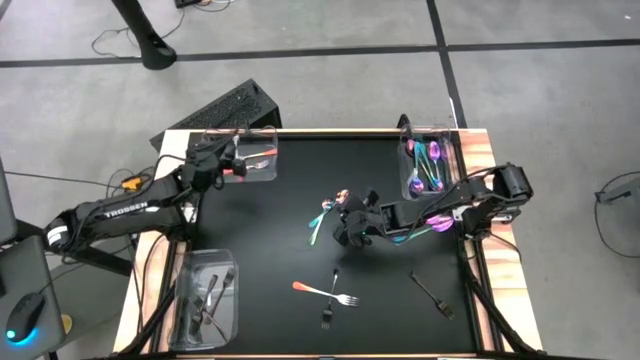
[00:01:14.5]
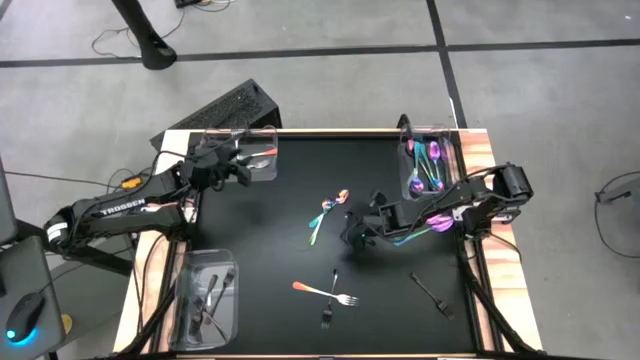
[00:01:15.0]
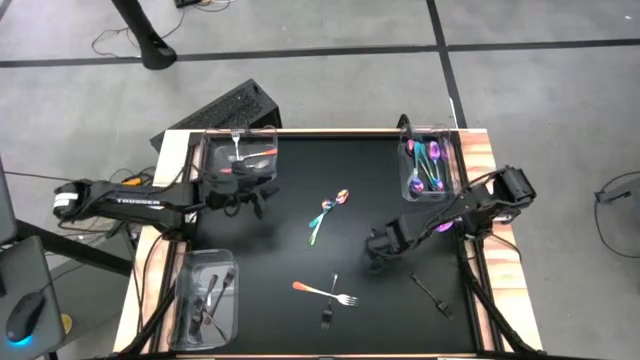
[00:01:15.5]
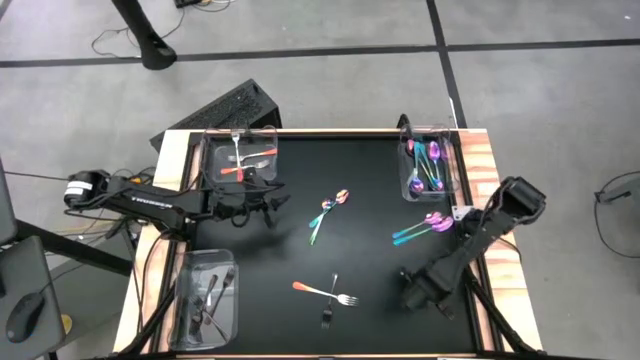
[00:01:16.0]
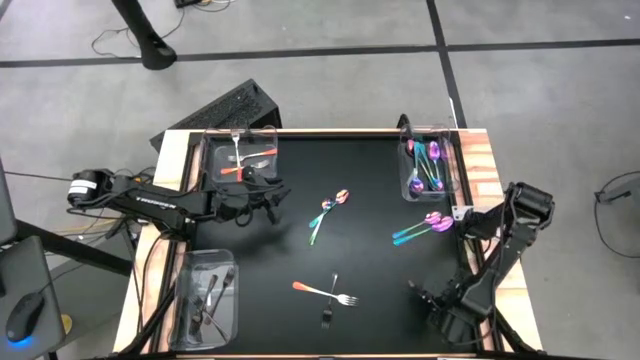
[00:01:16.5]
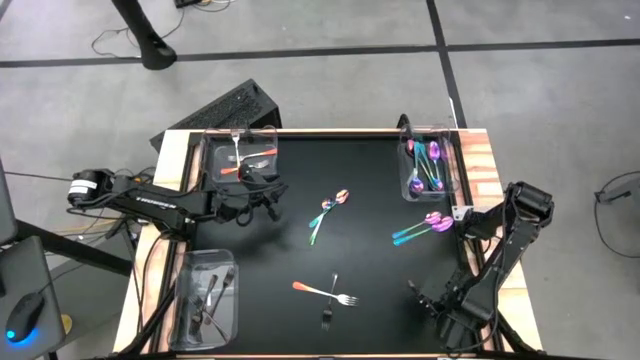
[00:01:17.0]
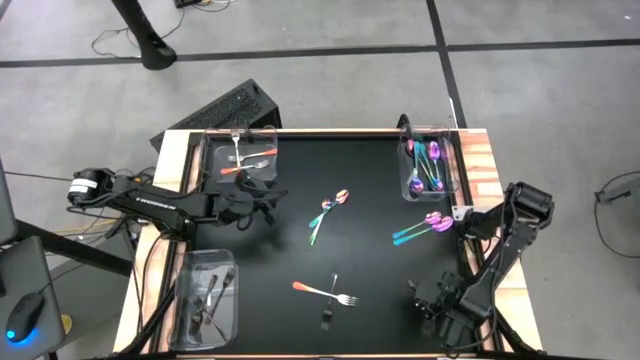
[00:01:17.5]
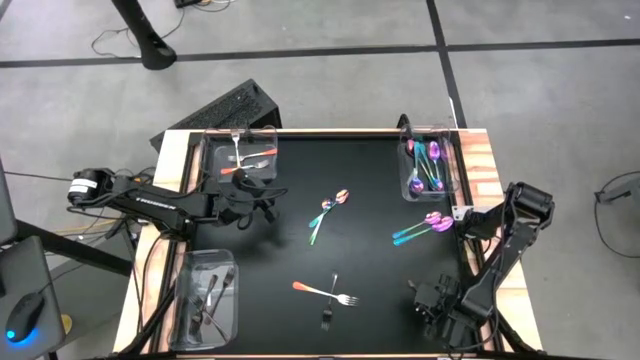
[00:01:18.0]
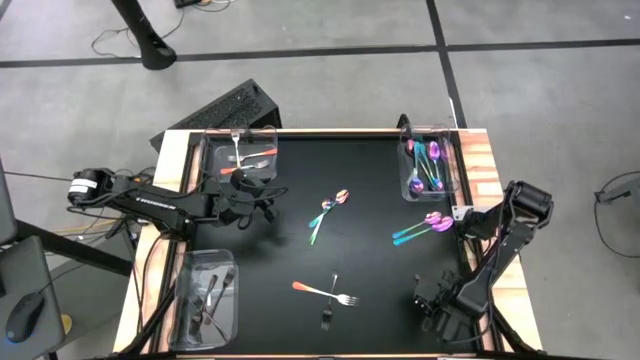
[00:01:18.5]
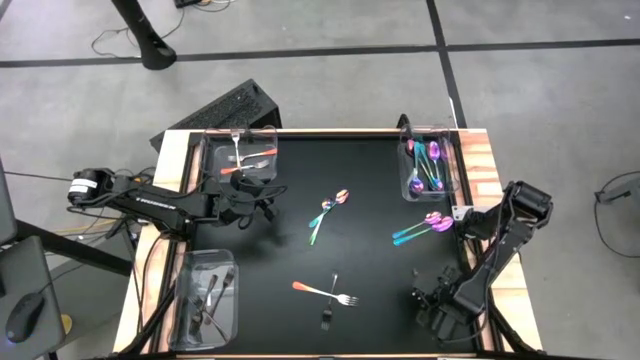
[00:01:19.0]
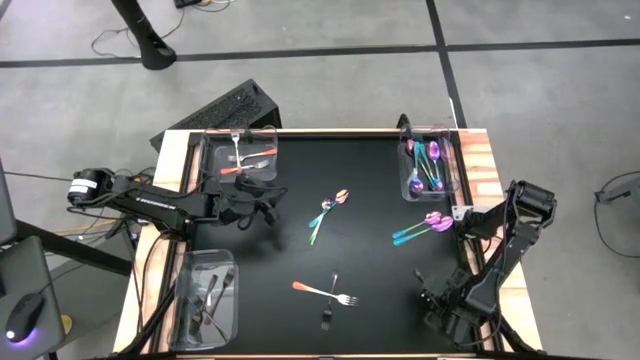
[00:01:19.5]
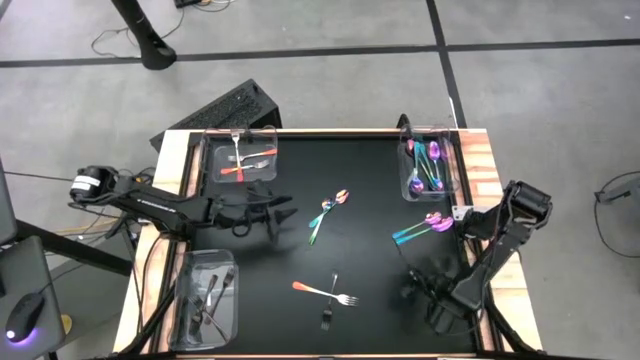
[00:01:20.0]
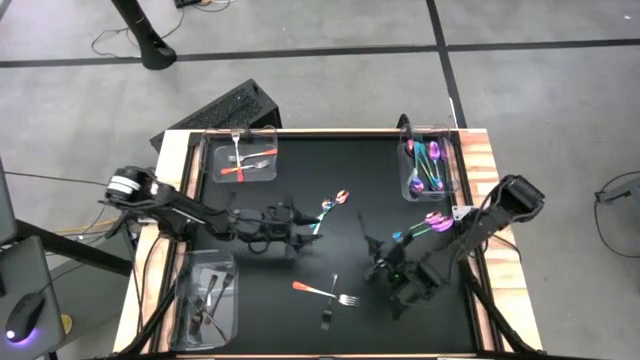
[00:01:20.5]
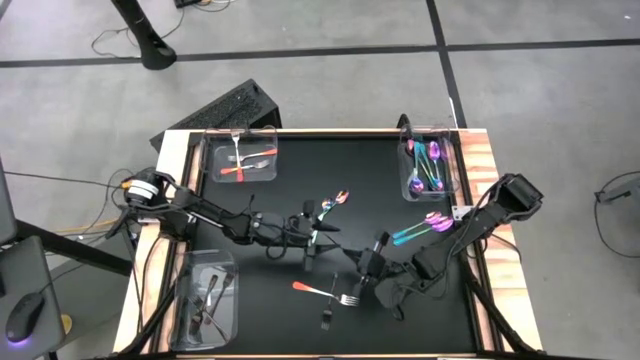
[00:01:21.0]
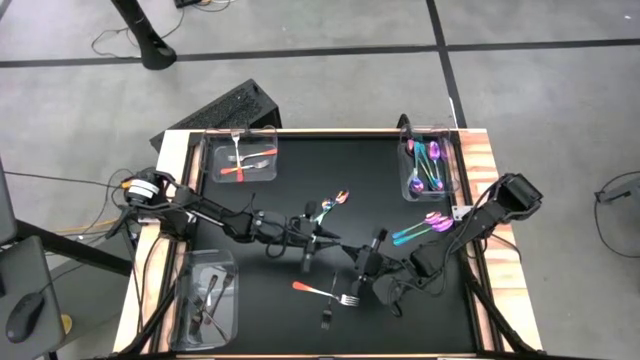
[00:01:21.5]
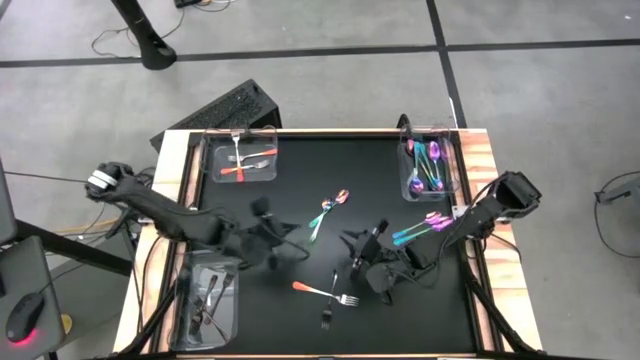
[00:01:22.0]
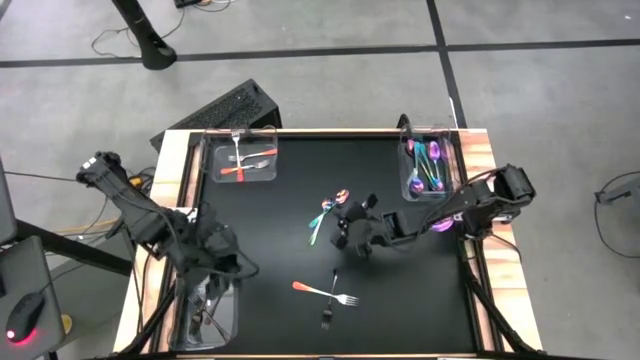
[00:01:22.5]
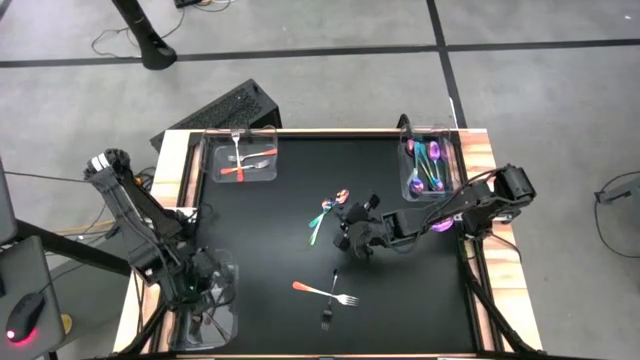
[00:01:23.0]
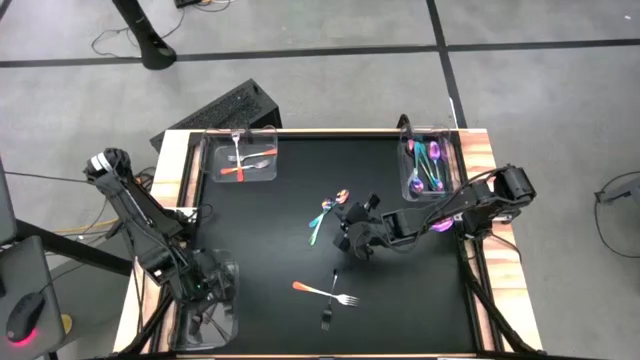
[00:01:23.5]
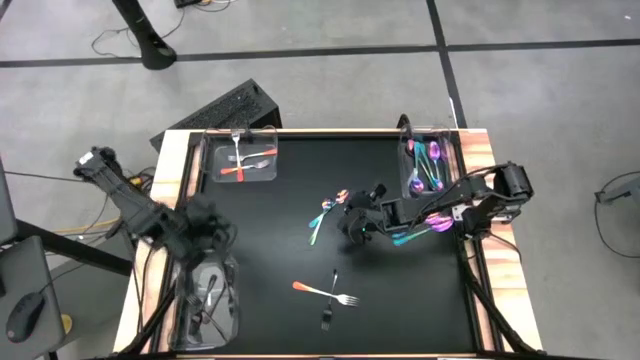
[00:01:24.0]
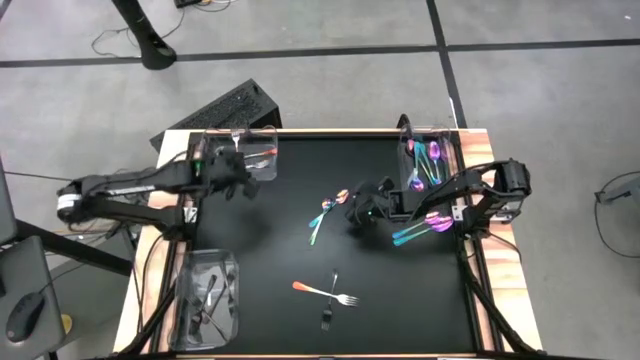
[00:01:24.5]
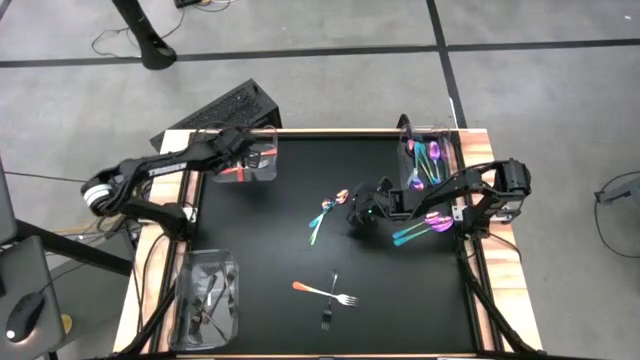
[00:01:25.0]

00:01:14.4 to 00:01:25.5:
Task: Sort silverware by color (type)
Put the black fork into the bottom transparent bin

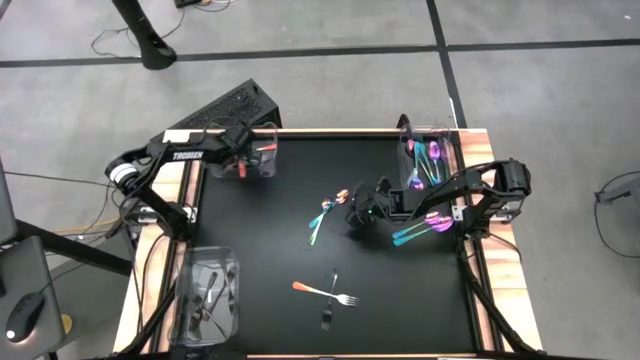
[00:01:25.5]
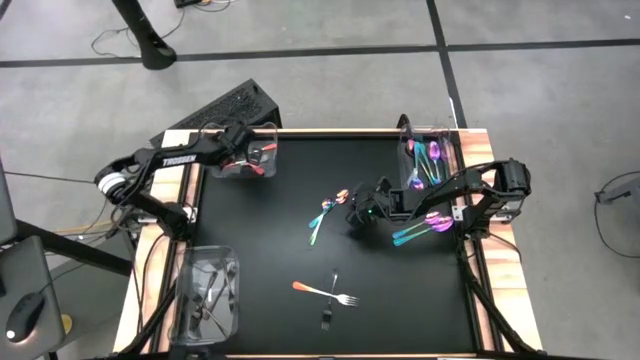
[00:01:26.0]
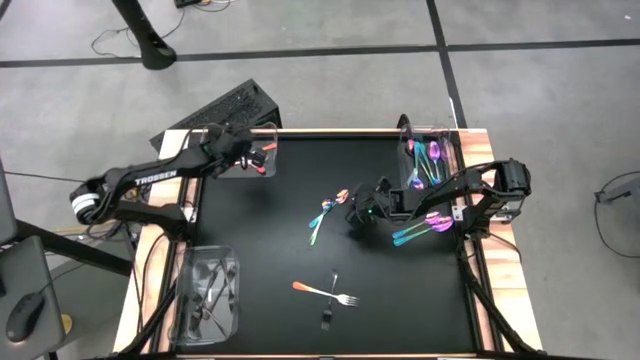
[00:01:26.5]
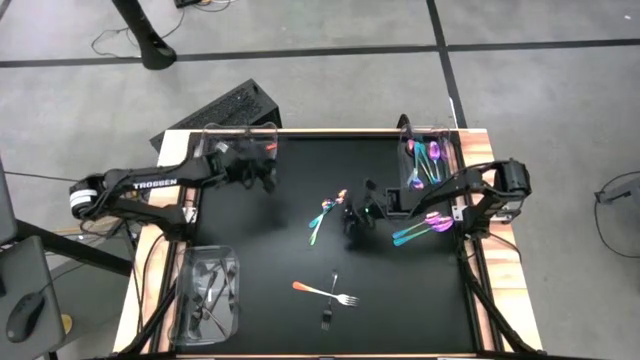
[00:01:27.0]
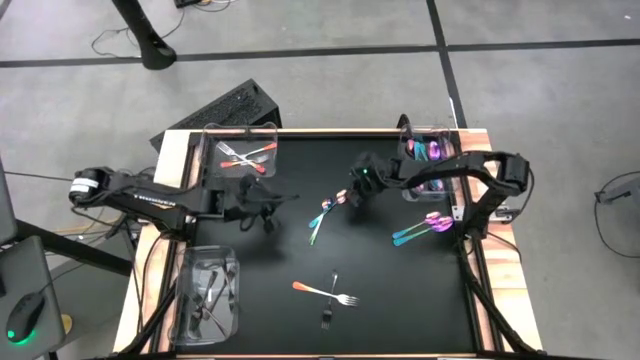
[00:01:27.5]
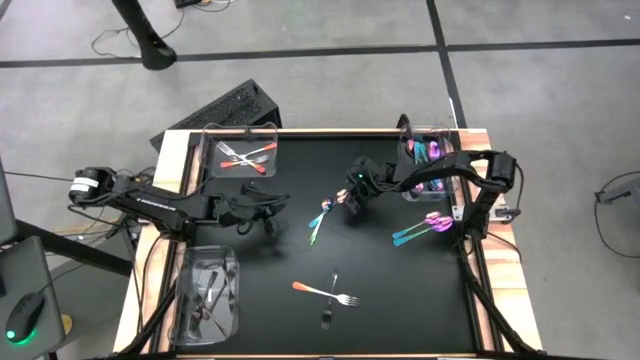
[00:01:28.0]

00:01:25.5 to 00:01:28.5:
Put the violet spoon into the top right transparent bin

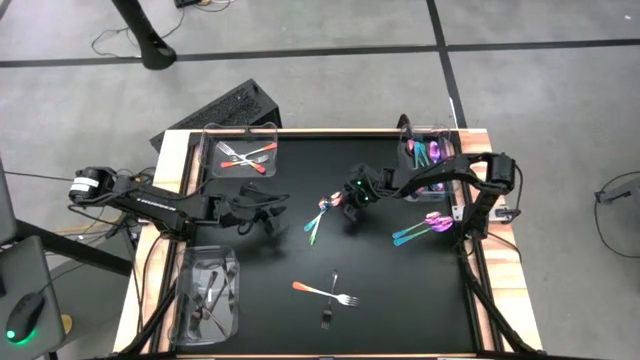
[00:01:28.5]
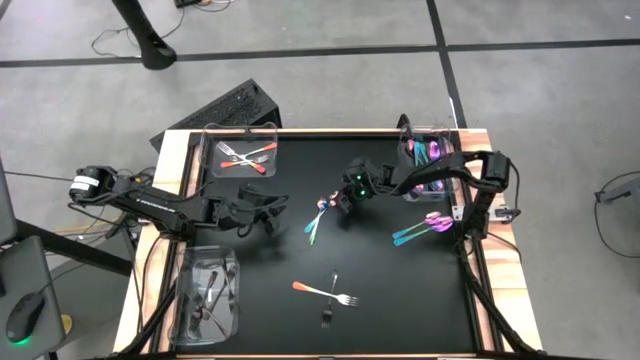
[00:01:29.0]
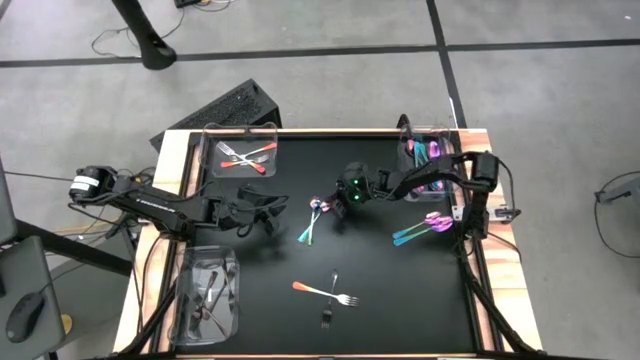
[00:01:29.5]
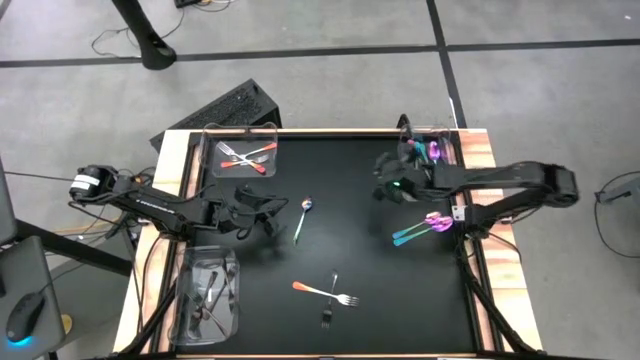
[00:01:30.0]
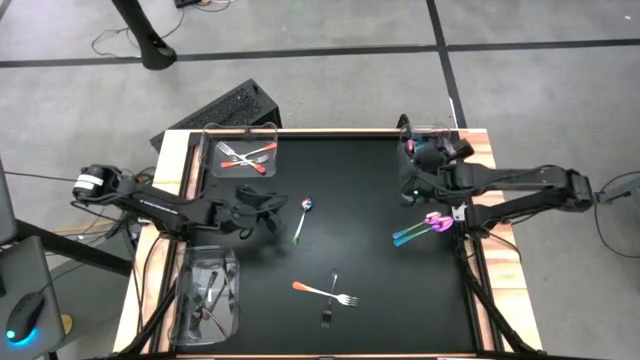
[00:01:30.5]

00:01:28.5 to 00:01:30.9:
Put the violet spoon into the top right transparent bin

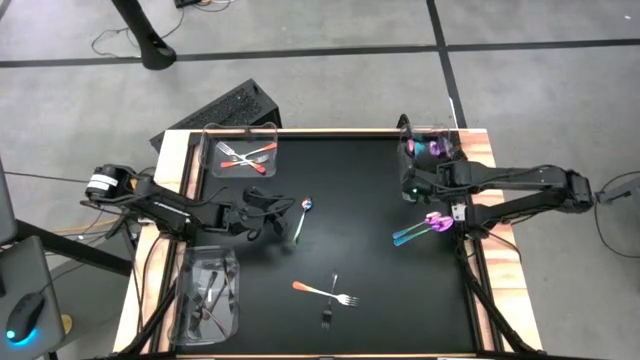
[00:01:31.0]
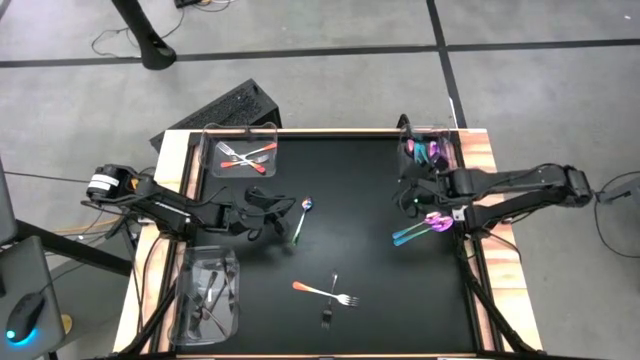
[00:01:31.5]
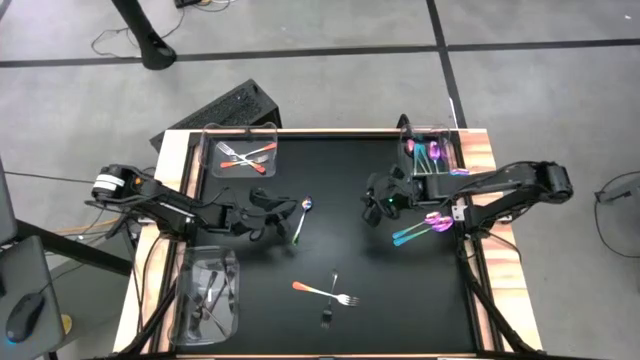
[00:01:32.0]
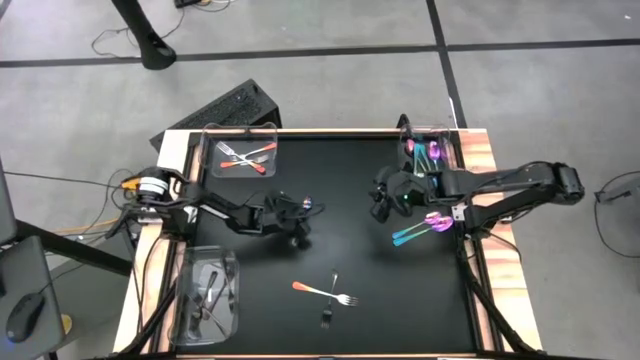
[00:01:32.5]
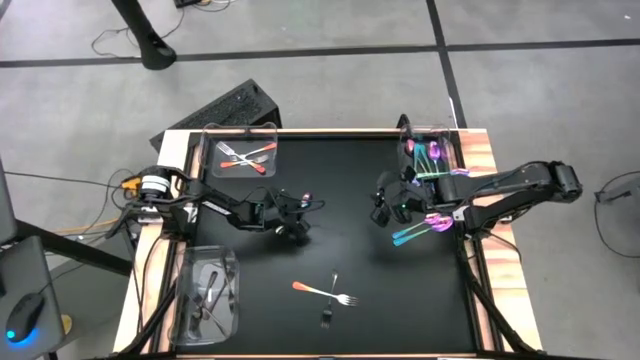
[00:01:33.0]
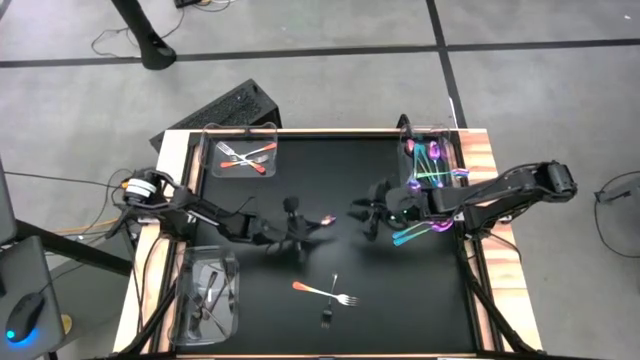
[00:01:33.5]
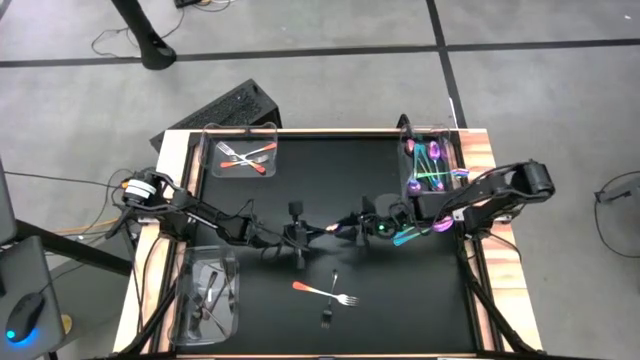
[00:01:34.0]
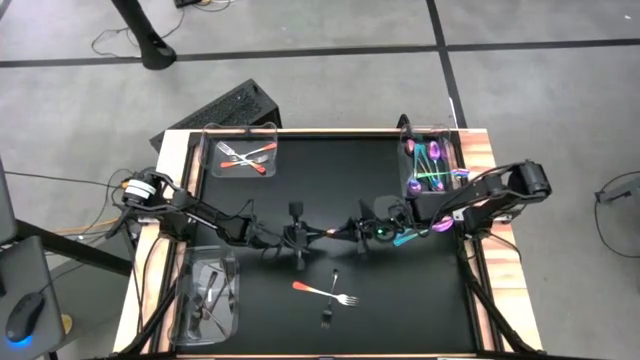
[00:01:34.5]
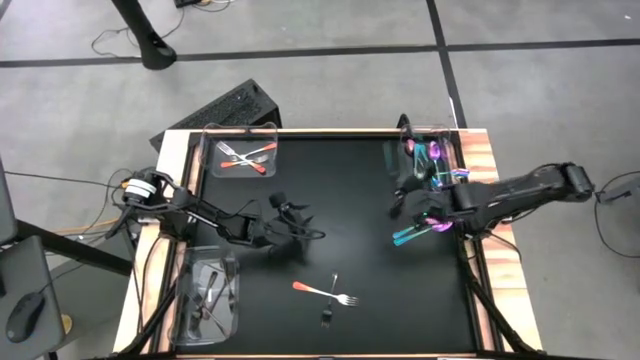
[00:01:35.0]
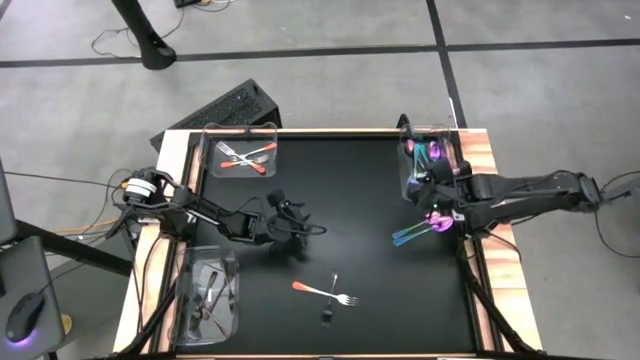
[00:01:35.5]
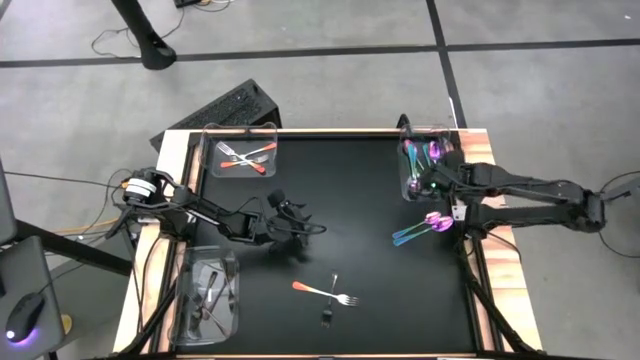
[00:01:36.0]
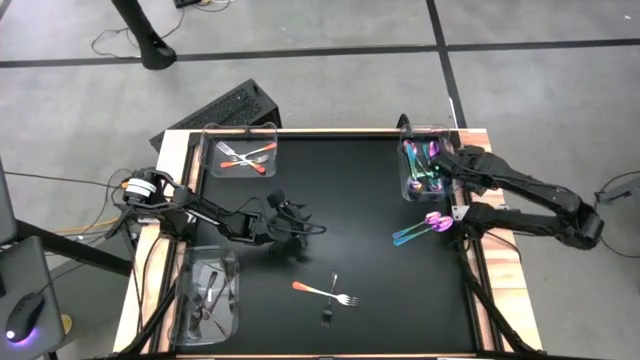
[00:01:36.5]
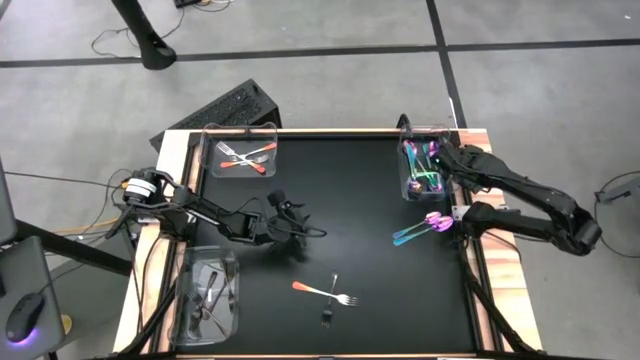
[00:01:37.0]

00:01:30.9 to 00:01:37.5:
Put the violet spoon into the top right transparent bin
